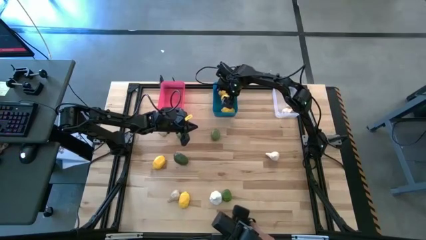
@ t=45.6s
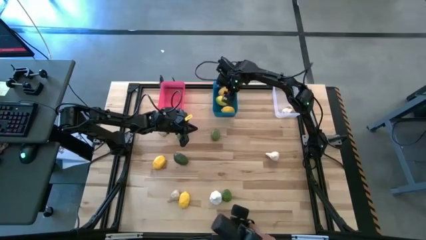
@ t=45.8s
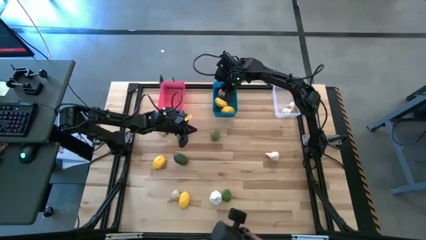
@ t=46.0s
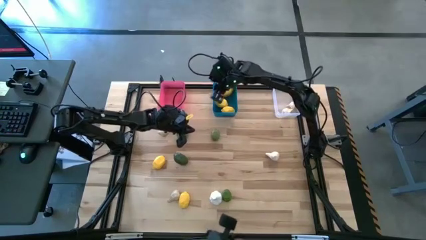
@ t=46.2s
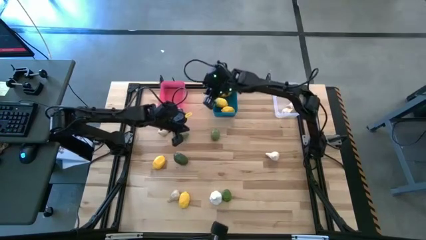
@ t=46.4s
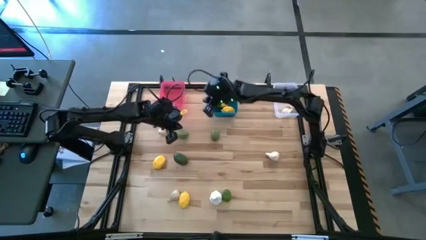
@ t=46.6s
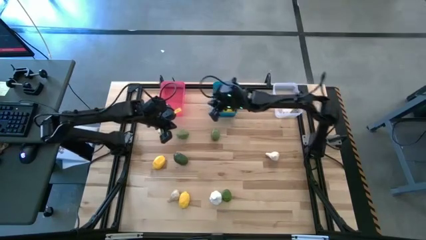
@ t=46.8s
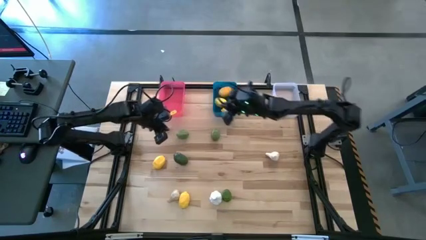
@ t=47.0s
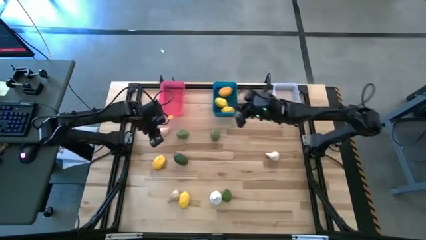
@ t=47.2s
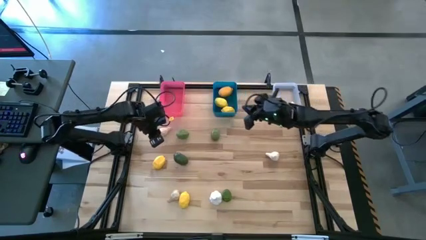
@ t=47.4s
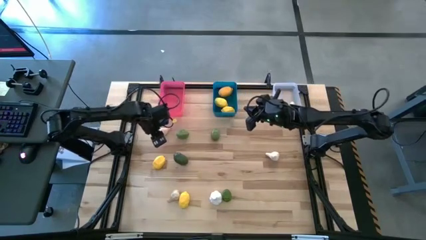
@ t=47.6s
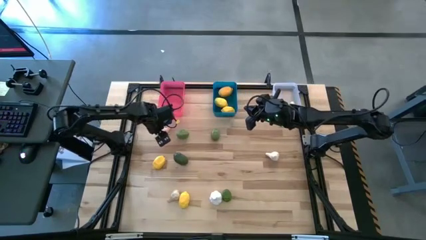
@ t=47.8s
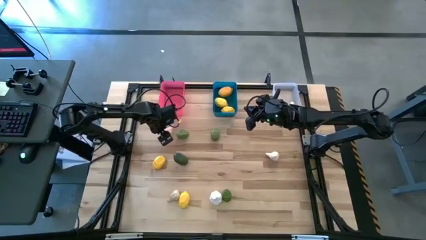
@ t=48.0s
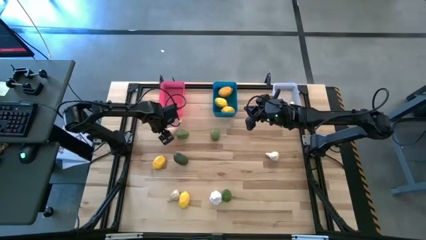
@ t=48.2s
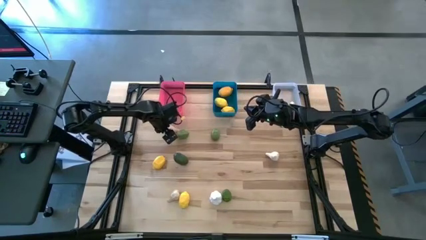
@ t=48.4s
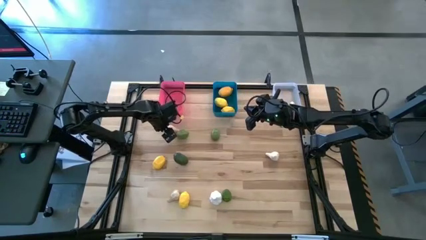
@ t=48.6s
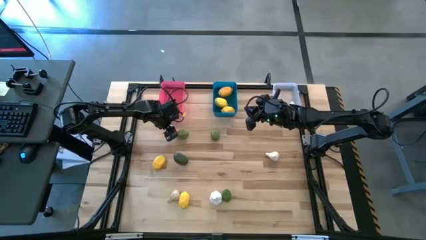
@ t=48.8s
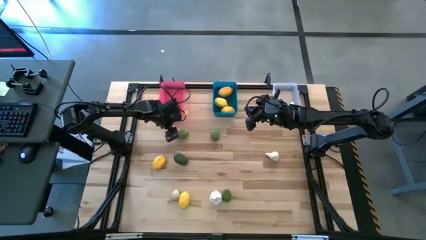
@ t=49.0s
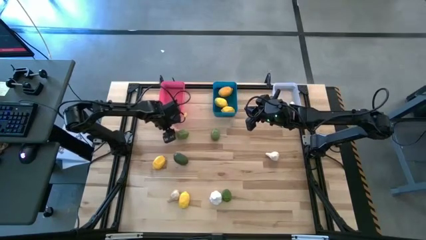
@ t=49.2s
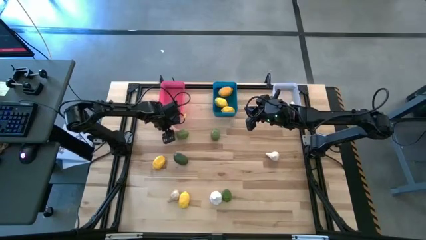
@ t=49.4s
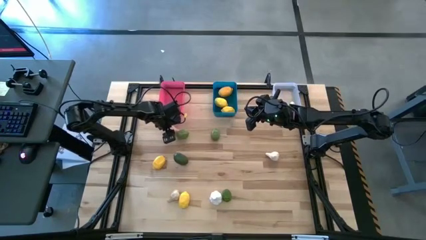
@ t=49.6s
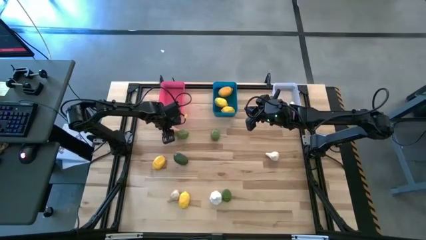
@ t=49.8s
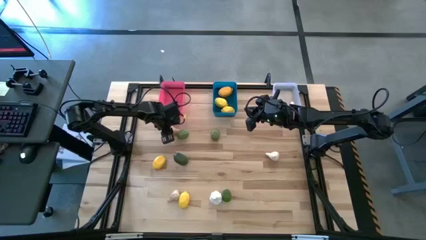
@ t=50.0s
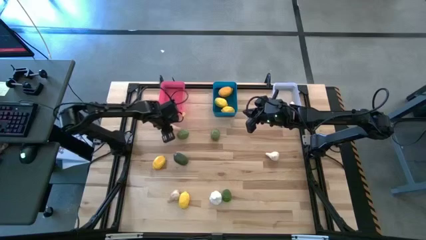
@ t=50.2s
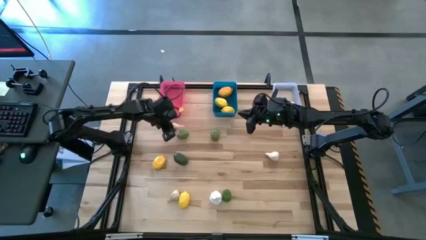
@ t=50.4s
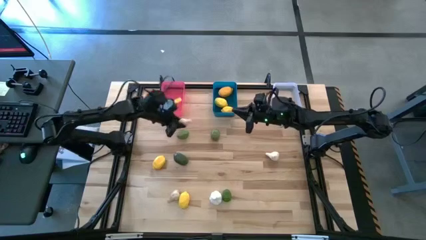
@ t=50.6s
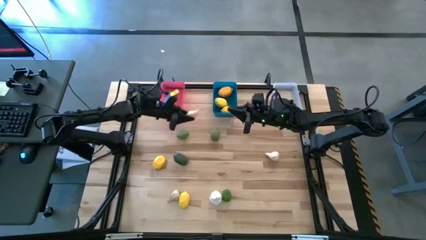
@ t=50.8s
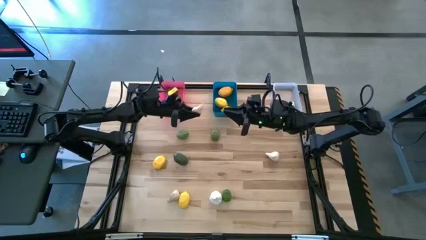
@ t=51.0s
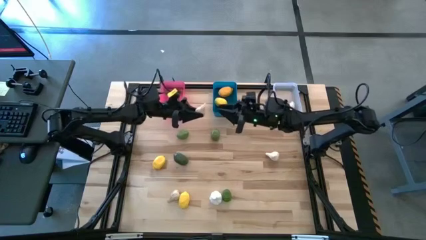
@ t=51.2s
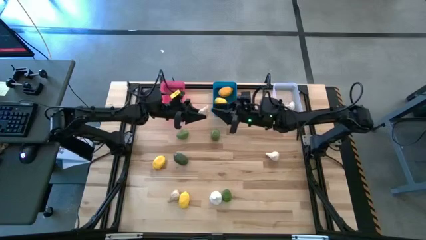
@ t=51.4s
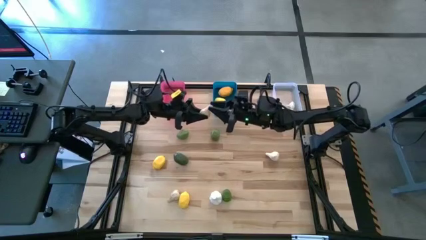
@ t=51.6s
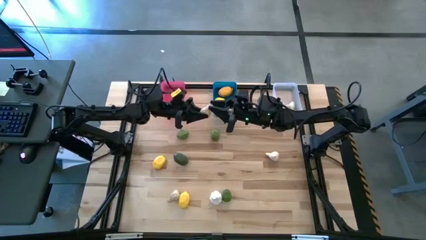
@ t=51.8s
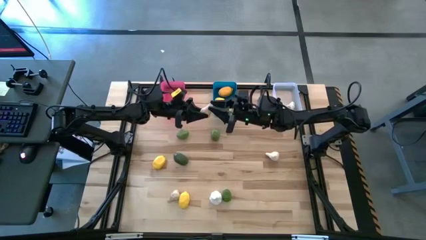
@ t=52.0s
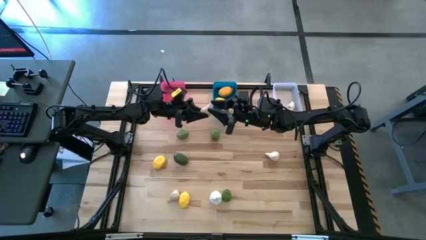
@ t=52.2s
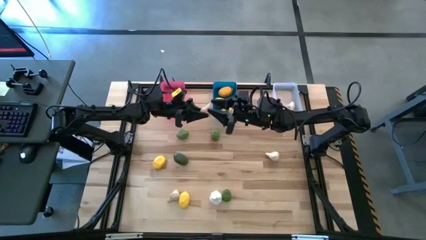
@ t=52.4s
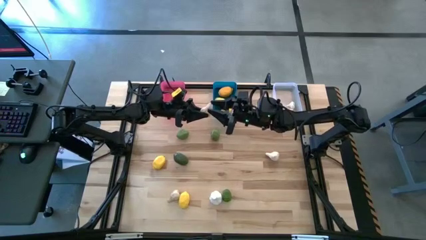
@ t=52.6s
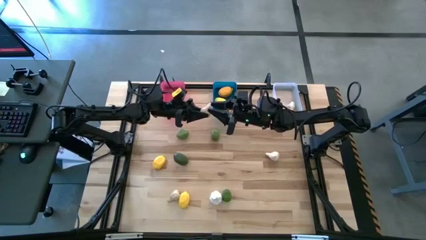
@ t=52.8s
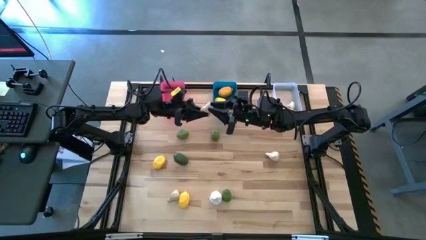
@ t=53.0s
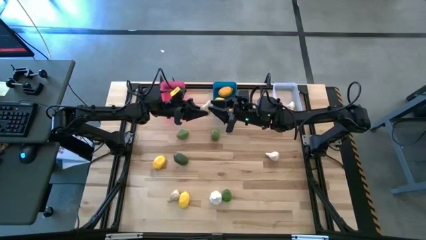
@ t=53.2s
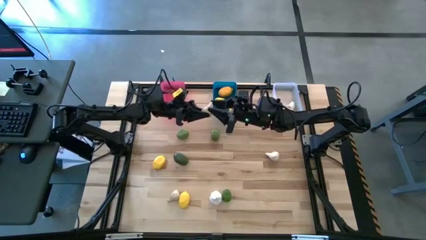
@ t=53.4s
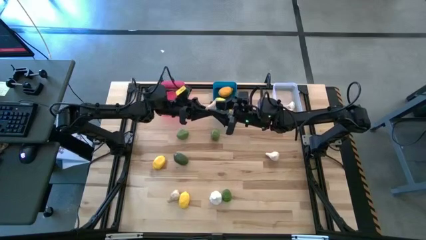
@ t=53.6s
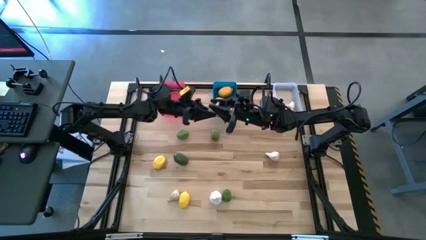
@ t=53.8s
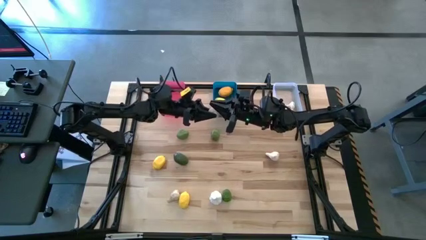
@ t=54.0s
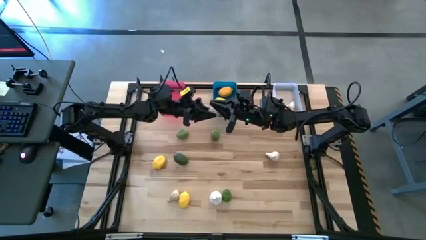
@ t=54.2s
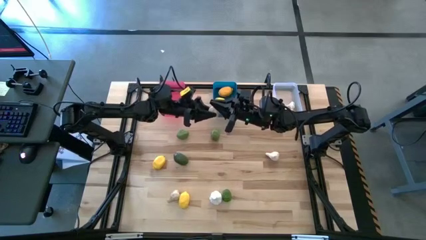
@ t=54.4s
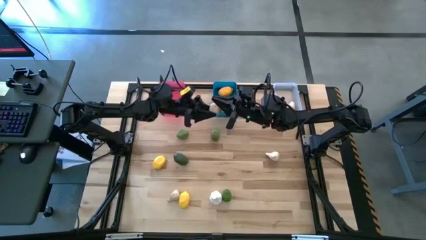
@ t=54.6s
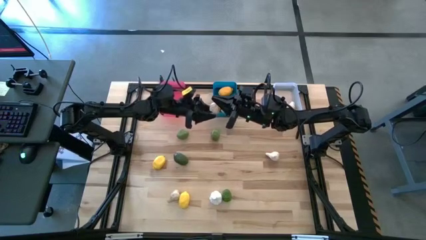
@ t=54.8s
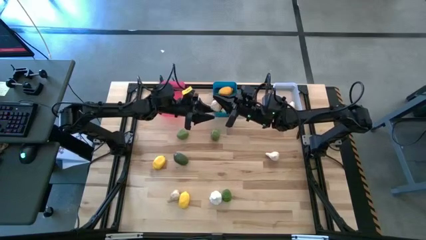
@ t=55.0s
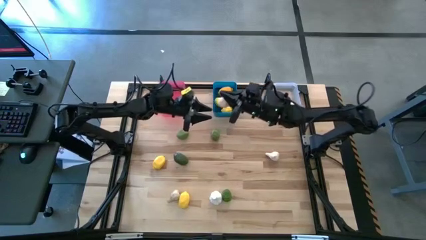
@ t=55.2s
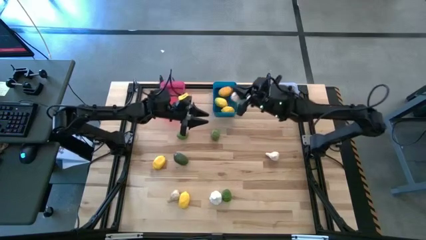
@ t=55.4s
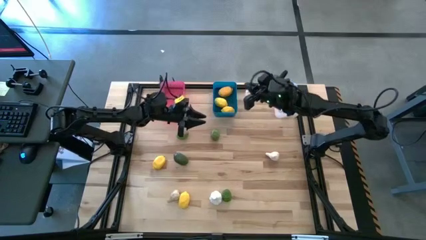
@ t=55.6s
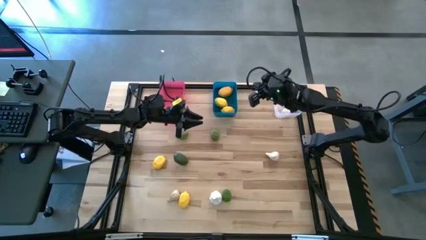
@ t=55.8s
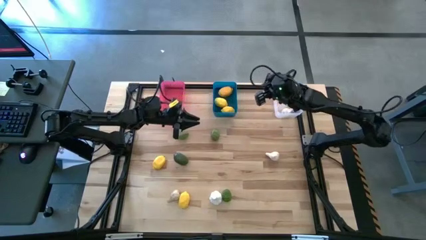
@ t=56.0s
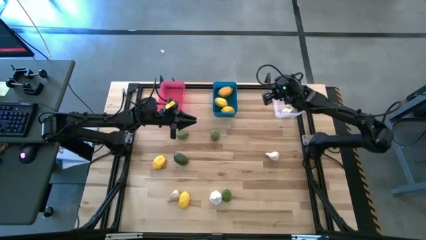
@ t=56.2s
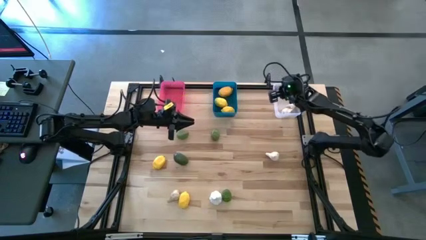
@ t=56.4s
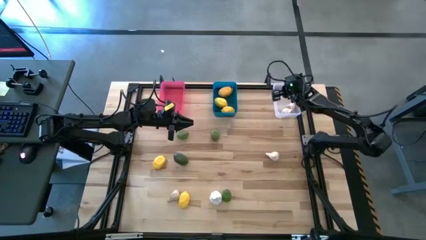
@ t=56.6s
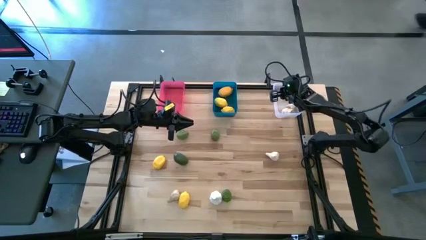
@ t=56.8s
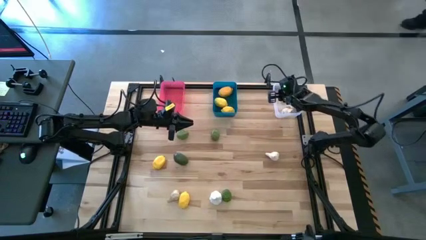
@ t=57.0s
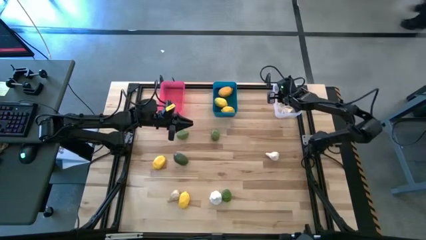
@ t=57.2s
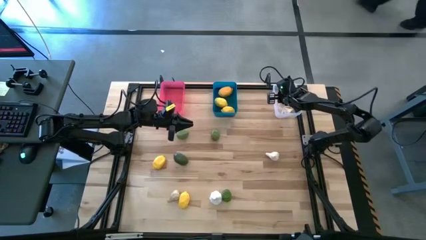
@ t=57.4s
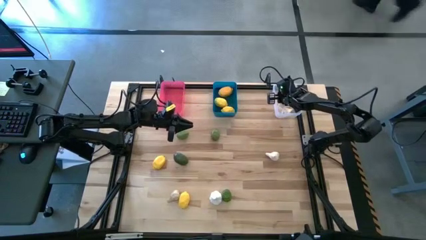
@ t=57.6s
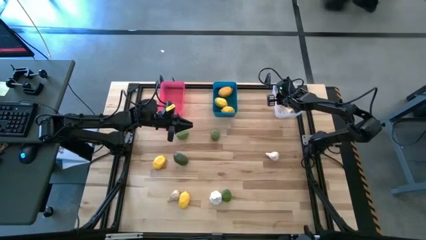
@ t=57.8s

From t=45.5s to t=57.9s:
Task: Sort produce into baskets
Put the garlic into the white bin

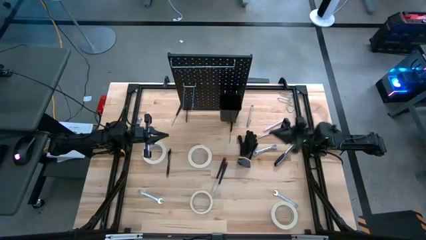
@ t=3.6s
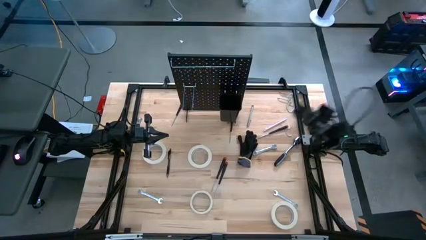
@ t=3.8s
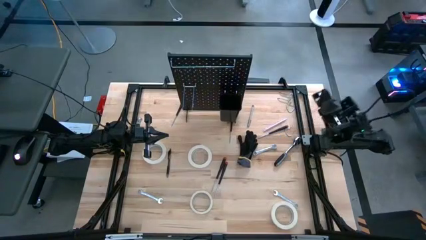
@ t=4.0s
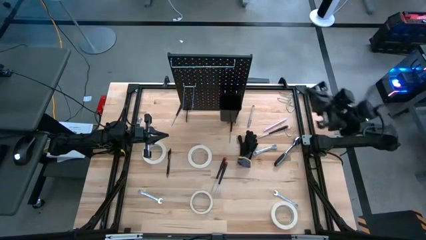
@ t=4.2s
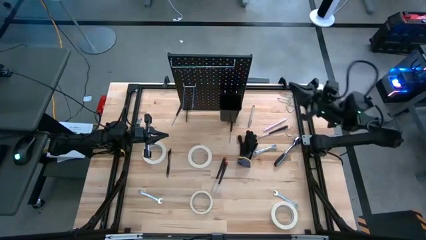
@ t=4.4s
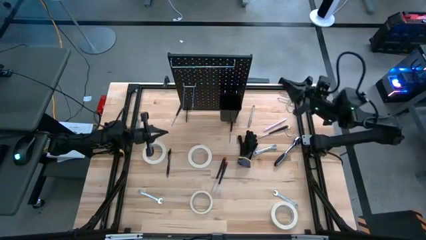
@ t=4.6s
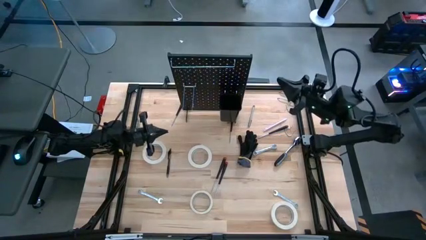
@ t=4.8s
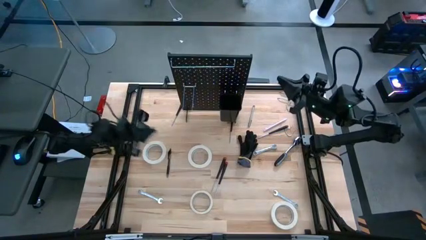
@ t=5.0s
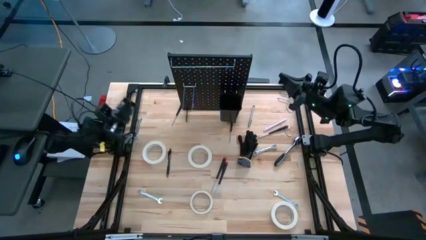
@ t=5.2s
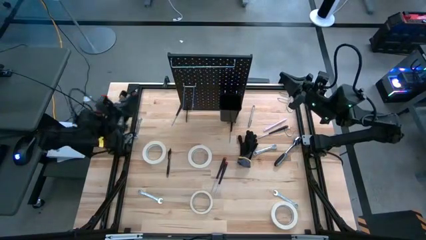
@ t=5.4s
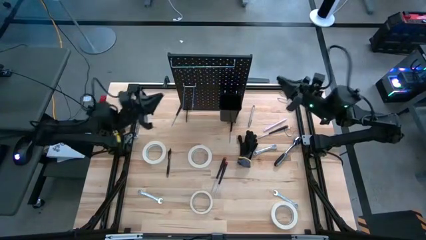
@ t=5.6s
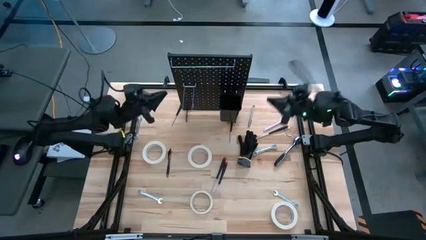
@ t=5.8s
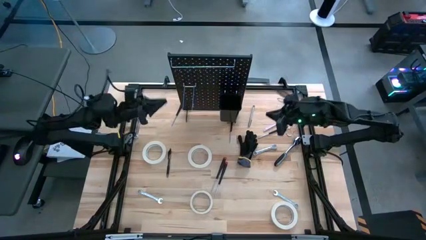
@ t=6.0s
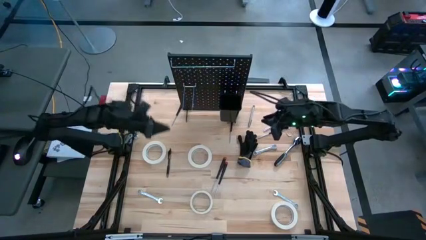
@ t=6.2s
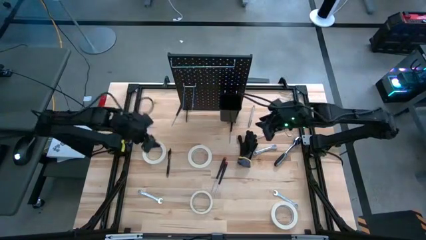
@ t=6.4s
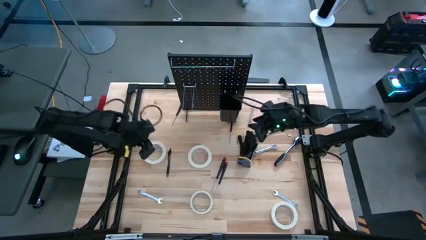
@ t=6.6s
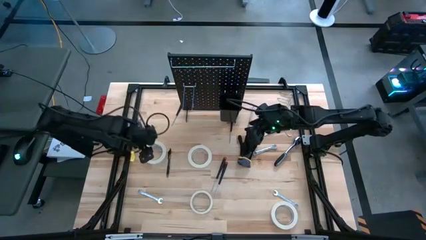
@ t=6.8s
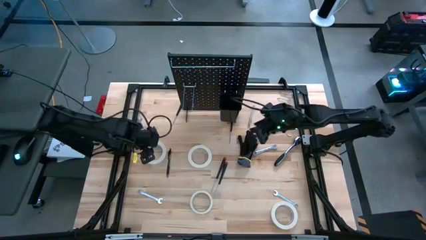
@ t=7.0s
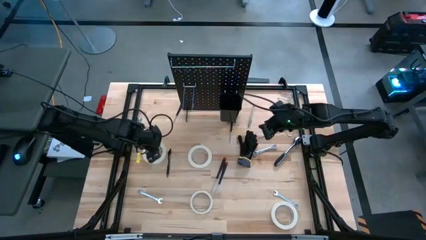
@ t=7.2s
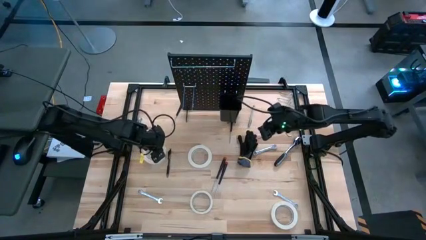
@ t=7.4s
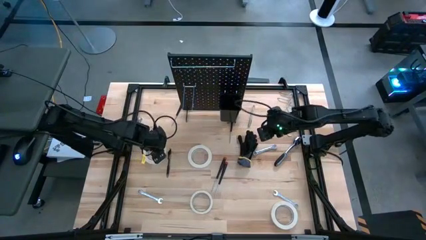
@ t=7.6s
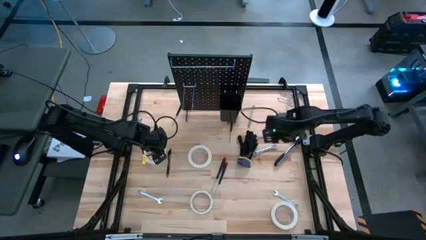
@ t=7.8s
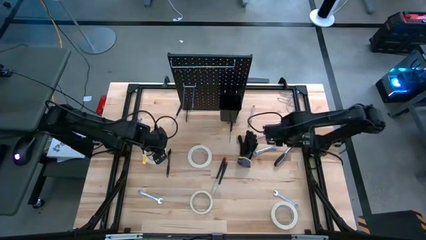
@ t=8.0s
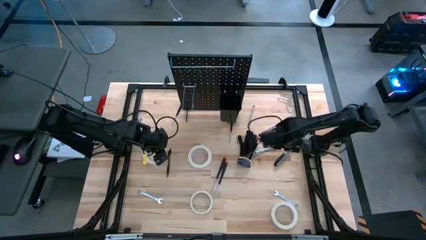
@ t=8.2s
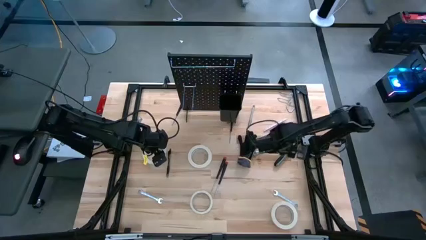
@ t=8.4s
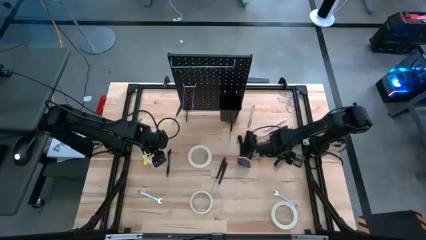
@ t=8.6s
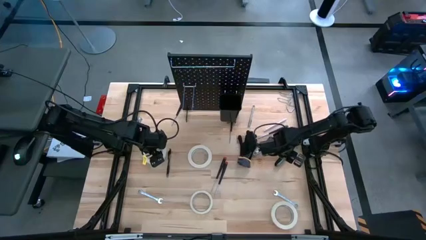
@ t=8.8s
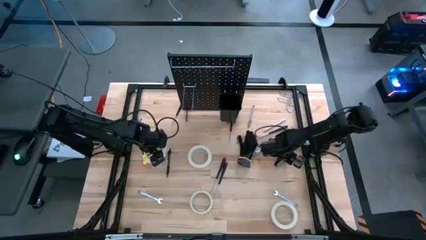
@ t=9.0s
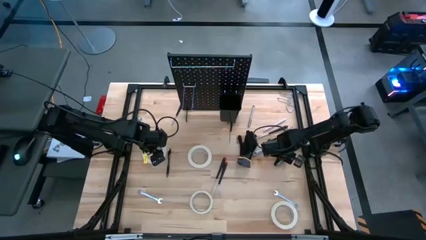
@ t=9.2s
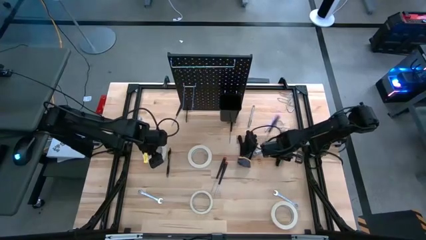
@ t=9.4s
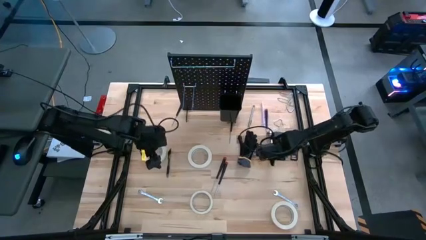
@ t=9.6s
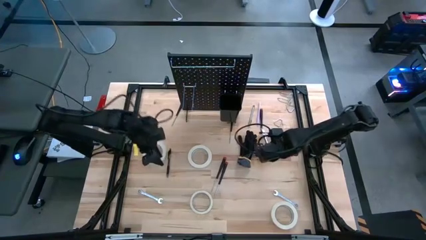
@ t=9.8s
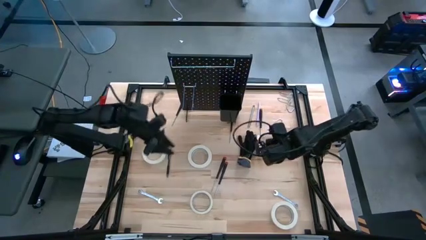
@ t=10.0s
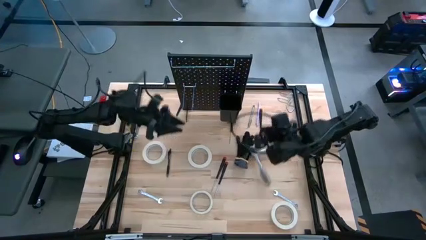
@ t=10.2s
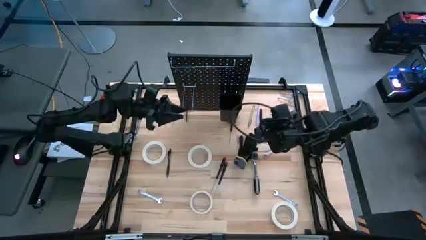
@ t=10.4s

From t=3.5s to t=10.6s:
Task: Hang tools onto peg board
Hang the ratchet tool onto the pegboard
